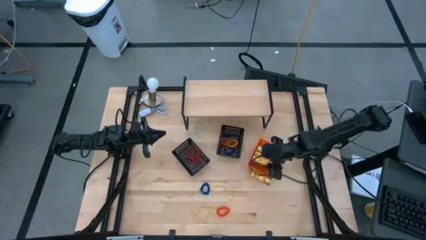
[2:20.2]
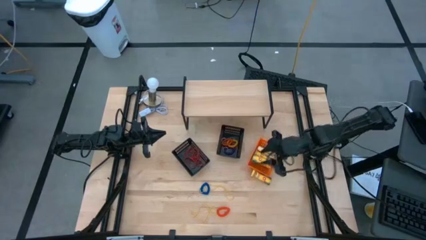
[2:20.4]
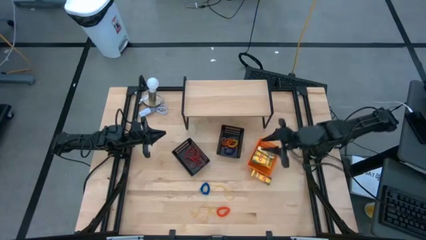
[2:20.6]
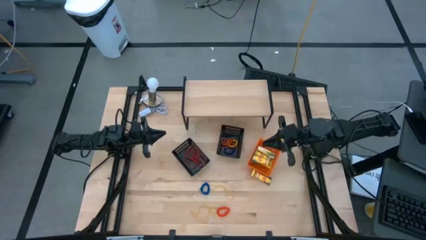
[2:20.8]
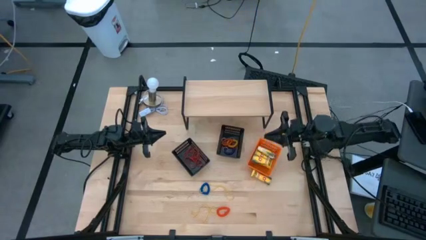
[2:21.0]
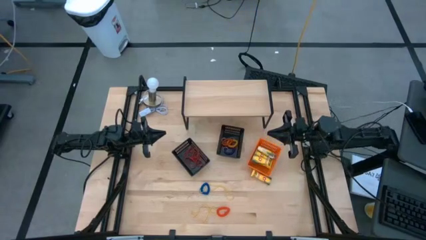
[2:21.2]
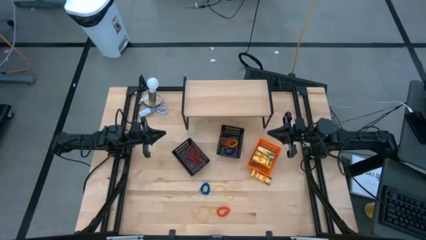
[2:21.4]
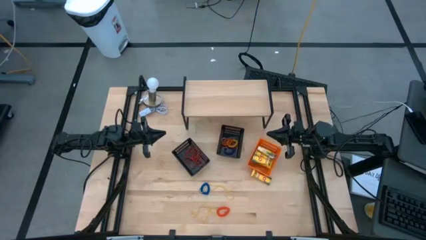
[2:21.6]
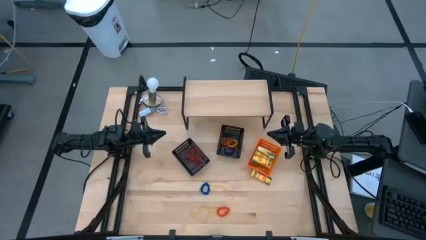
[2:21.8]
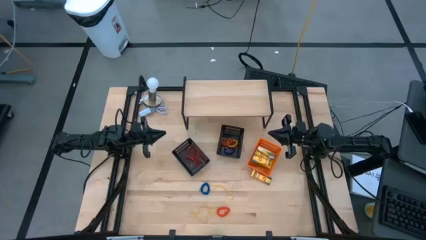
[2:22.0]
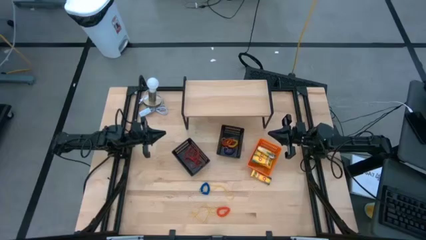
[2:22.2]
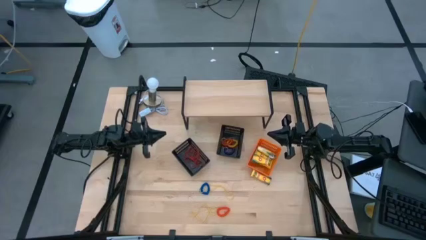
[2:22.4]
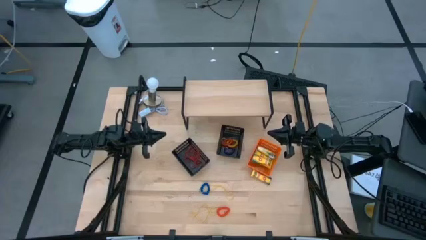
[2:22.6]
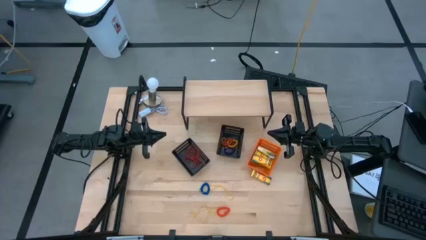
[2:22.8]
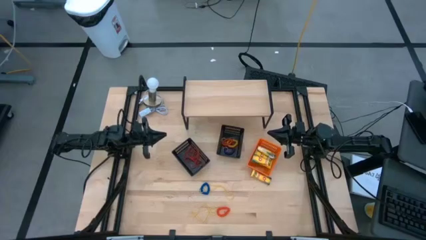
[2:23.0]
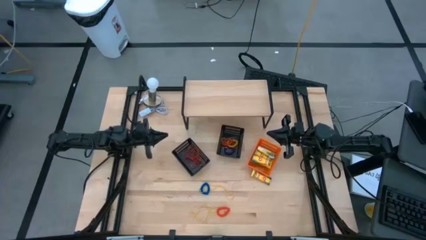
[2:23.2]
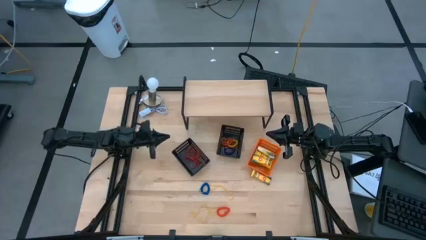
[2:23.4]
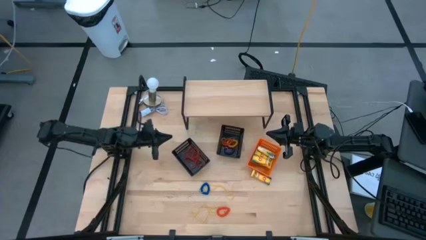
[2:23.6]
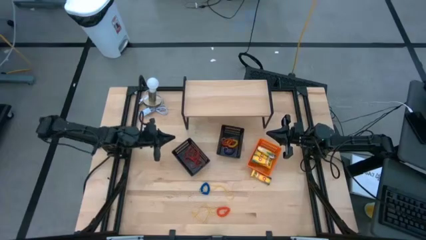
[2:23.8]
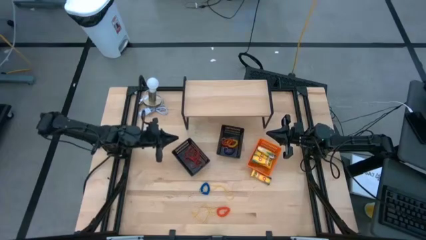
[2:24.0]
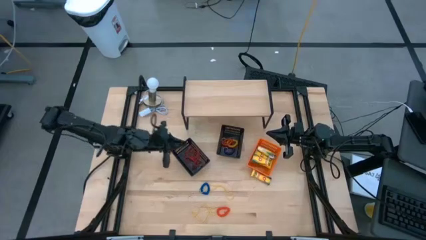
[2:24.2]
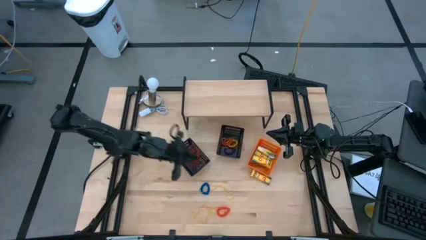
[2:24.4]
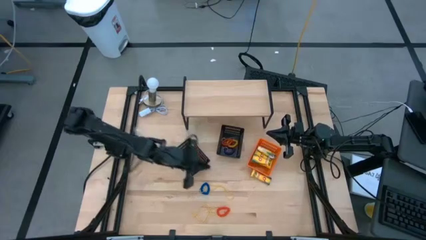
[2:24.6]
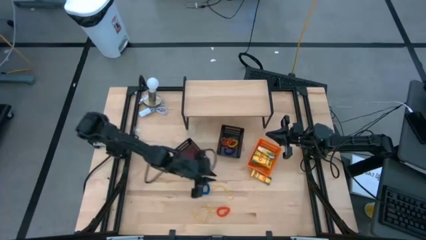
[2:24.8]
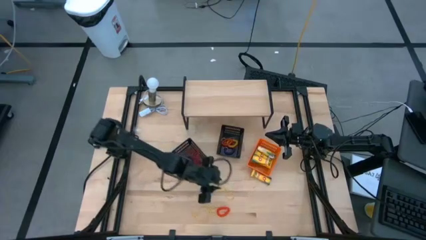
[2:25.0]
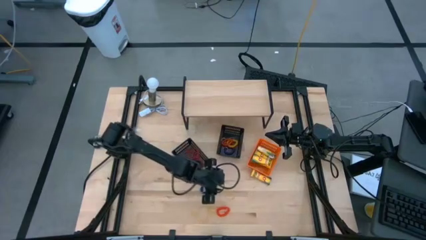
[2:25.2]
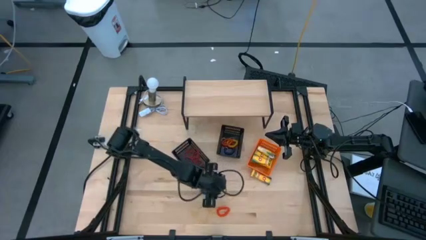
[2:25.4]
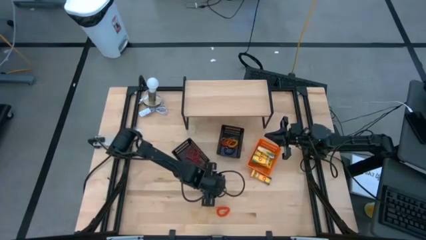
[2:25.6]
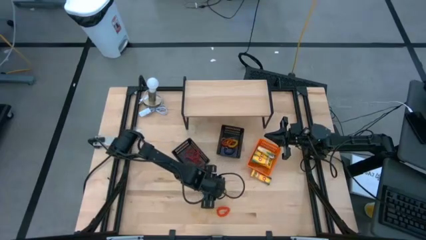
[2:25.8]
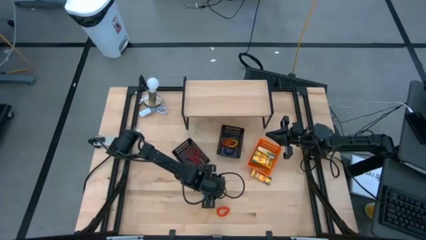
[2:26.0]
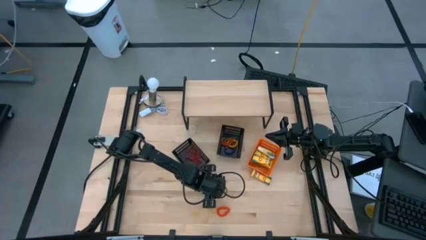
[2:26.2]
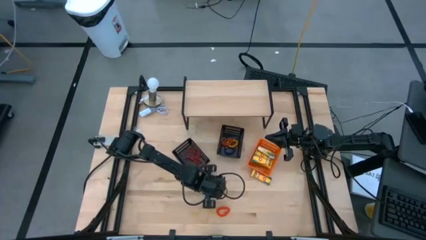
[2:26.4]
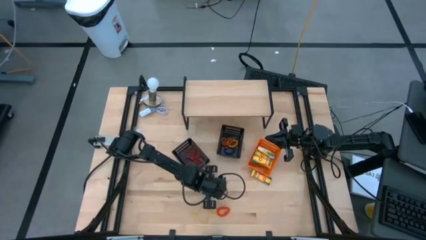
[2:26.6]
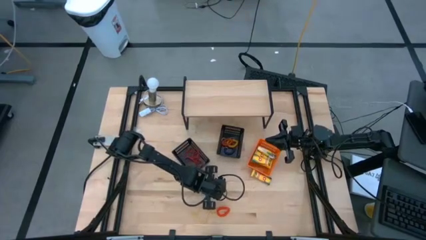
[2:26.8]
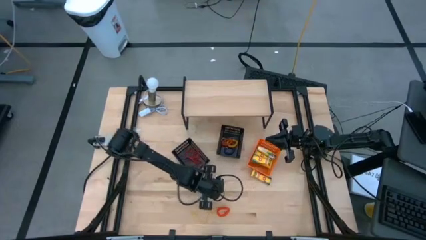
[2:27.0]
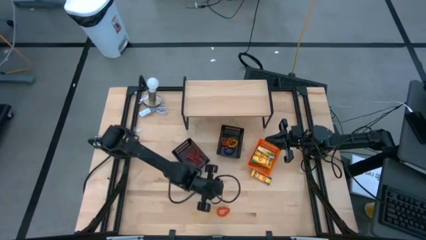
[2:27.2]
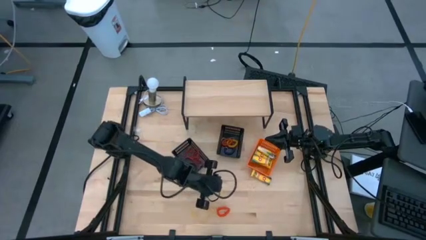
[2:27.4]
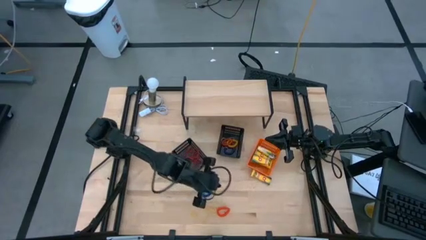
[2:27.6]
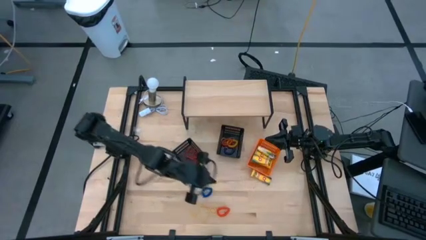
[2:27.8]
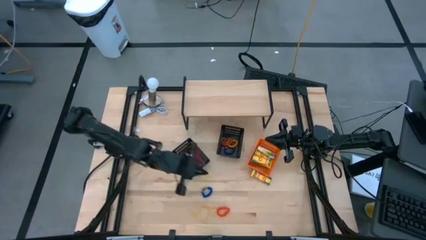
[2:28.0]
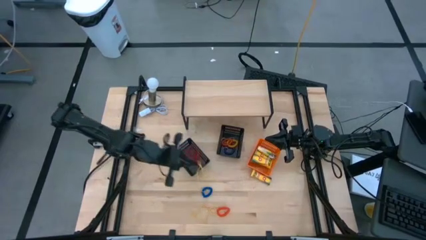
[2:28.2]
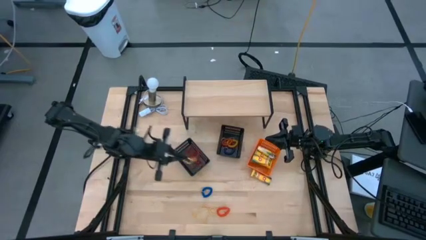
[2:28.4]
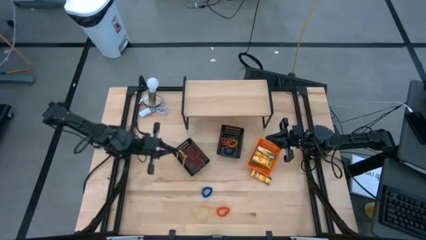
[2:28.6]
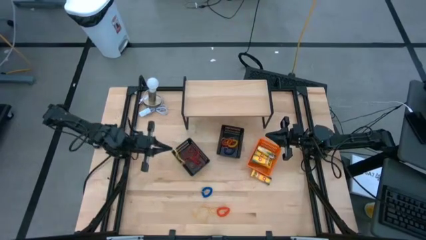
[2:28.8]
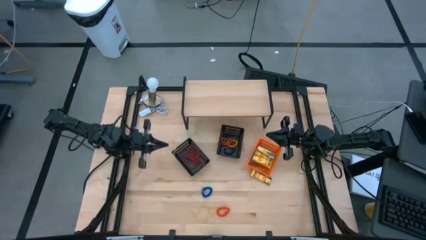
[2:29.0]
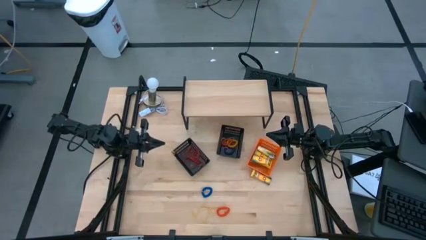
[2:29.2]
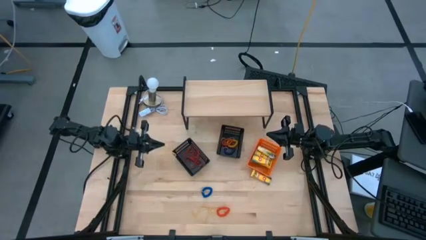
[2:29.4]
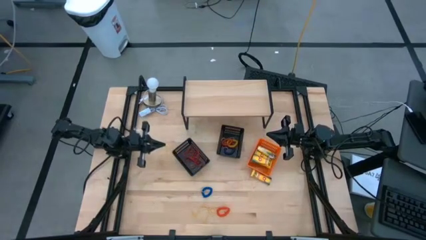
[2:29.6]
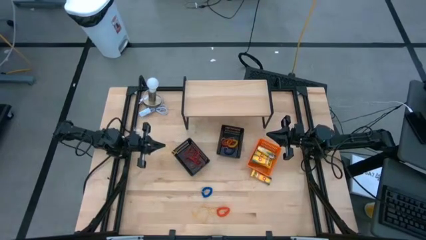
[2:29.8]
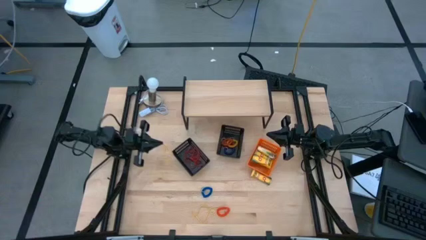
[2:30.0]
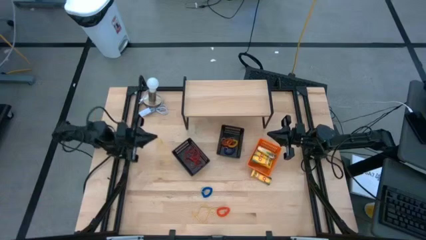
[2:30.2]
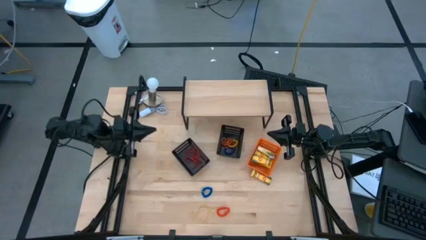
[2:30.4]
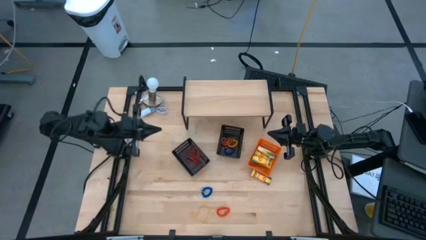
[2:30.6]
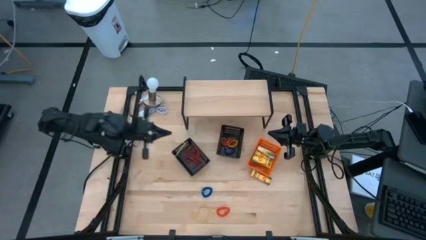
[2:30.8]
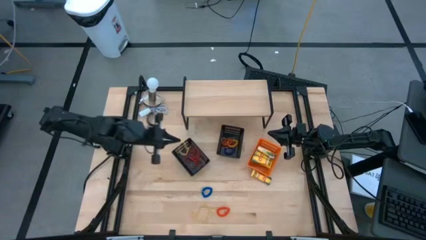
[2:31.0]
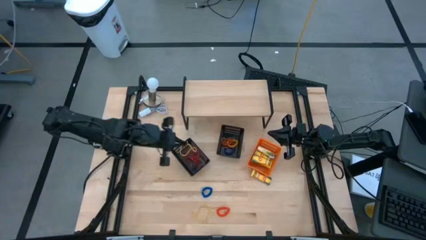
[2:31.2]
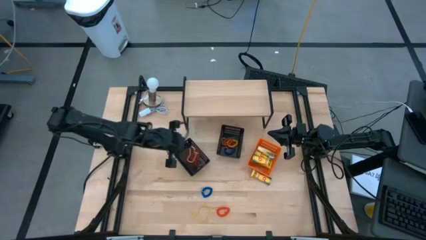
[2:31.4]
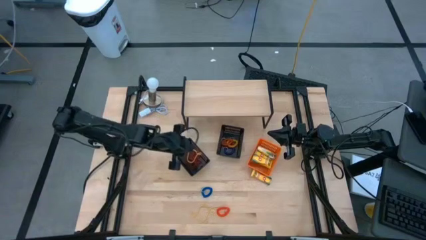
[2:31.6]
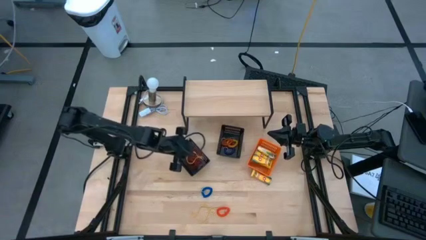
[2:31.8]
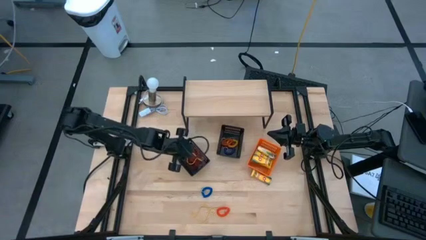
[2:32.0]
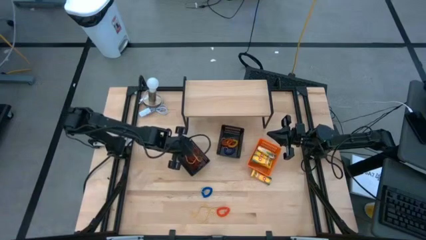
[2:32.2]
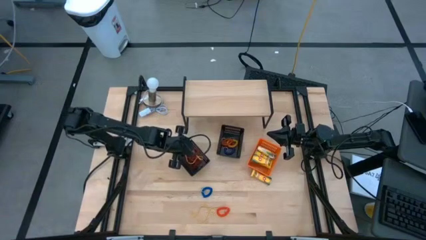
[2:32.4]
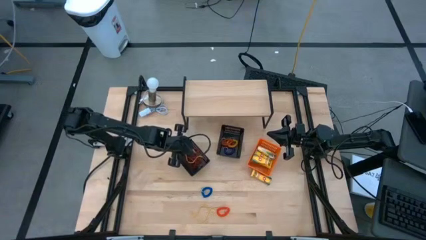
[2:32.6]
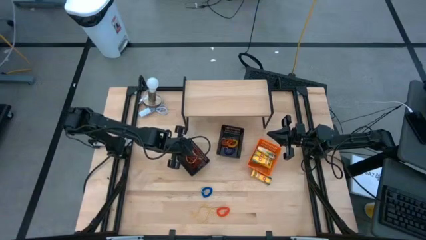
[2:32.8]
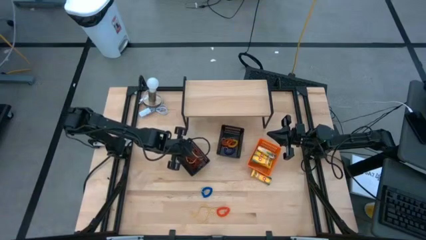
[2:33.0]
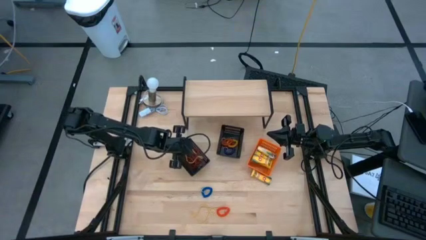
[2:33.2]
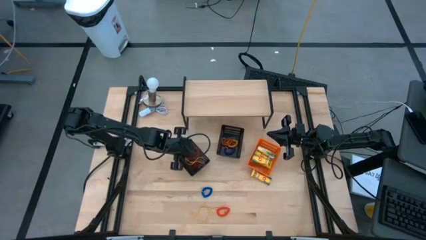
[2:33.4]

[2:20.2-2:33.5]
Task: Pick & Place Office Desk Supplies
Put the yellow rubber band into the left black bin
